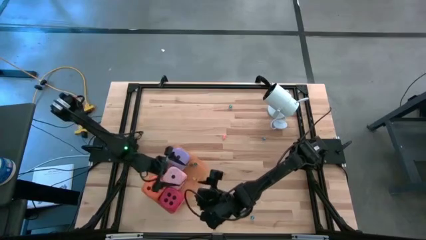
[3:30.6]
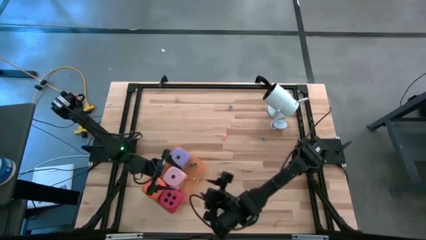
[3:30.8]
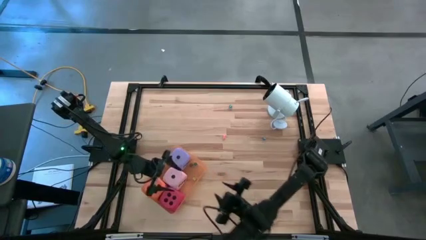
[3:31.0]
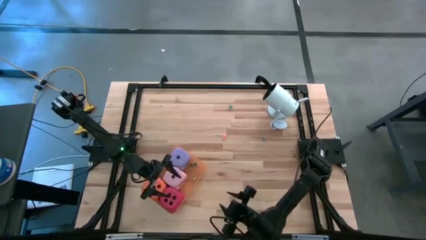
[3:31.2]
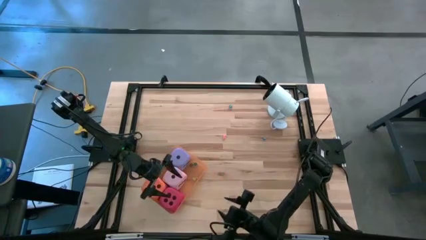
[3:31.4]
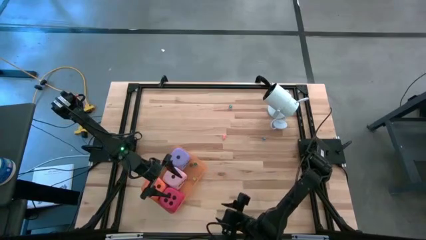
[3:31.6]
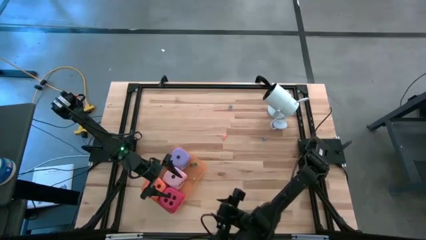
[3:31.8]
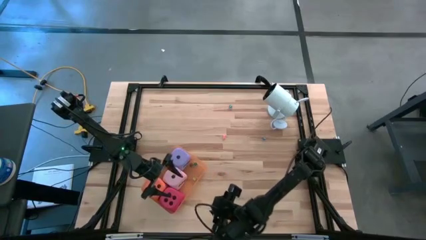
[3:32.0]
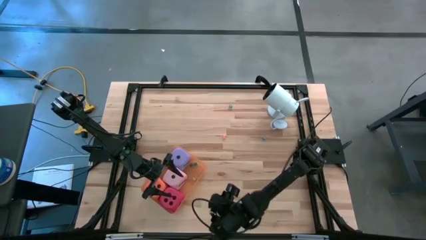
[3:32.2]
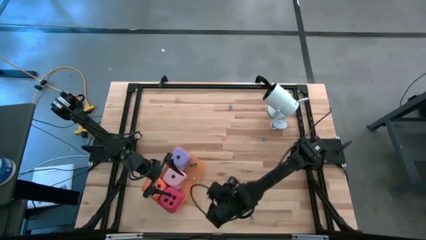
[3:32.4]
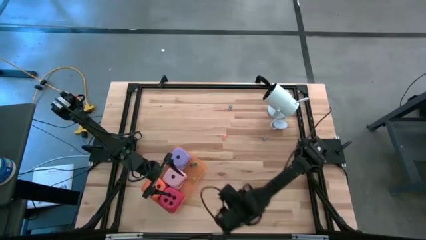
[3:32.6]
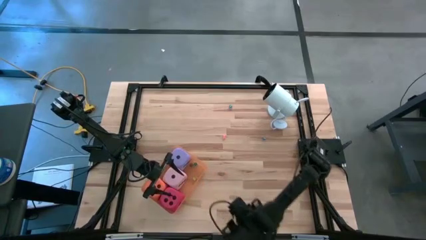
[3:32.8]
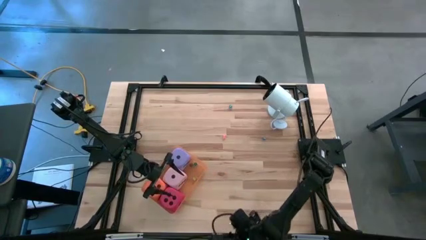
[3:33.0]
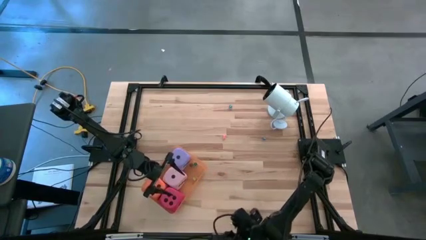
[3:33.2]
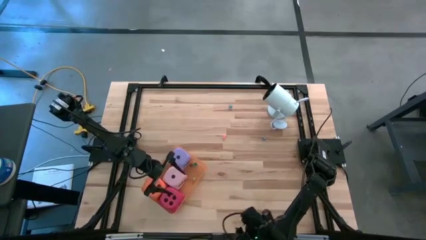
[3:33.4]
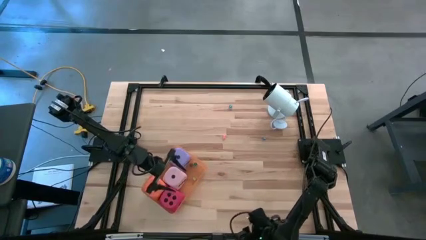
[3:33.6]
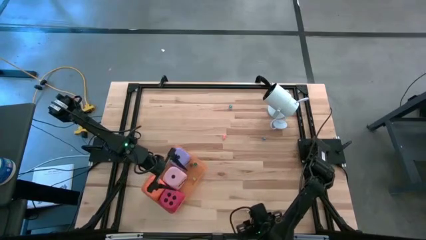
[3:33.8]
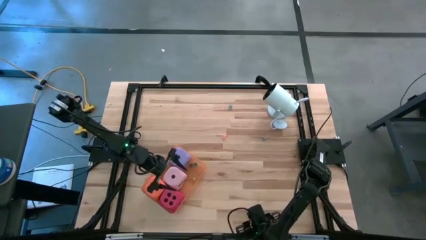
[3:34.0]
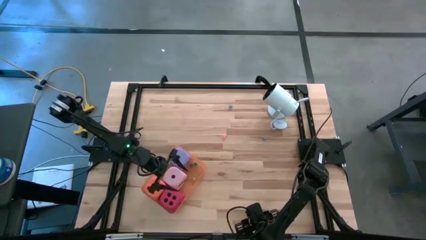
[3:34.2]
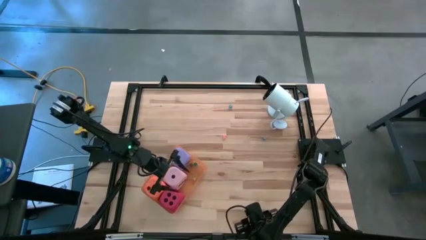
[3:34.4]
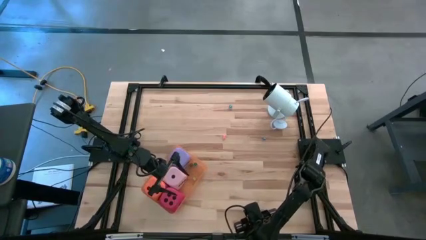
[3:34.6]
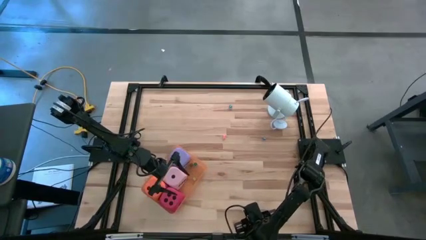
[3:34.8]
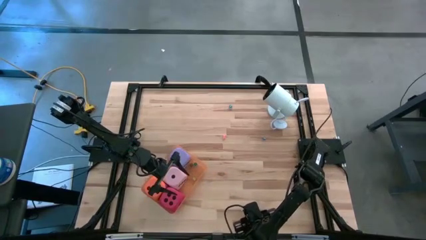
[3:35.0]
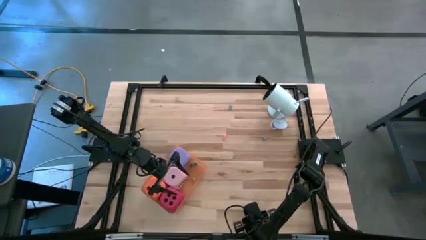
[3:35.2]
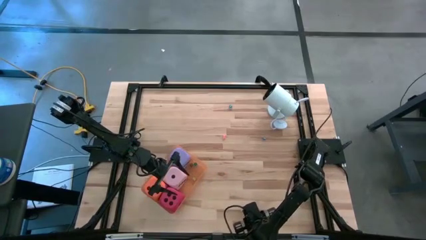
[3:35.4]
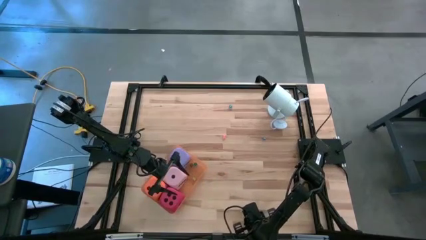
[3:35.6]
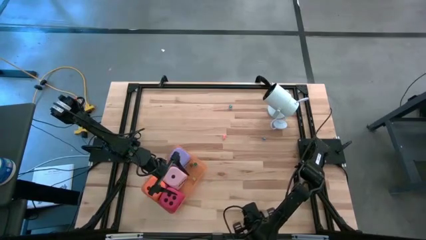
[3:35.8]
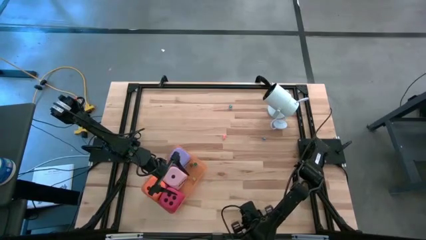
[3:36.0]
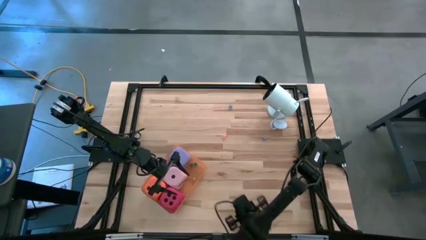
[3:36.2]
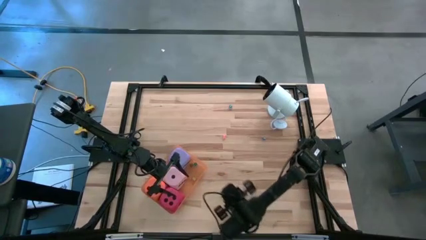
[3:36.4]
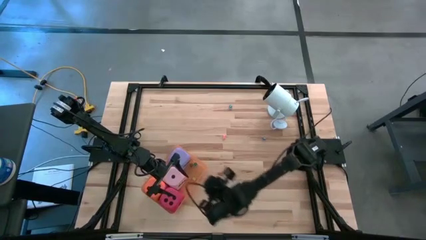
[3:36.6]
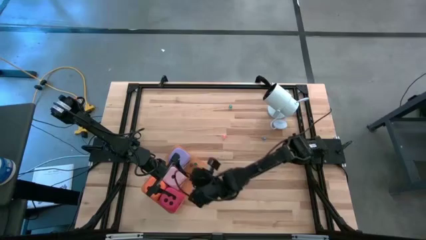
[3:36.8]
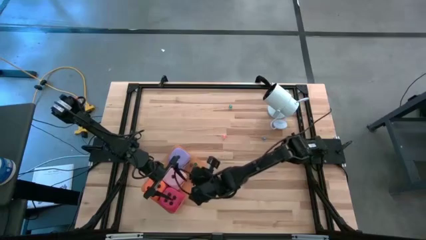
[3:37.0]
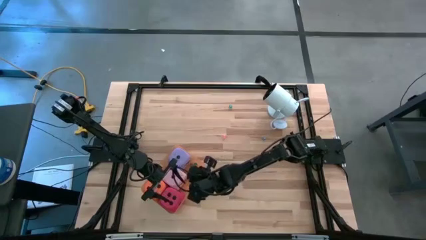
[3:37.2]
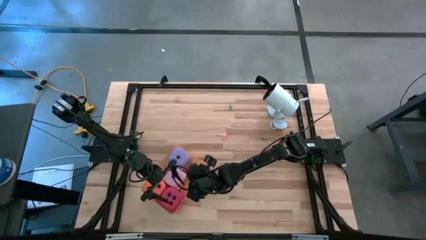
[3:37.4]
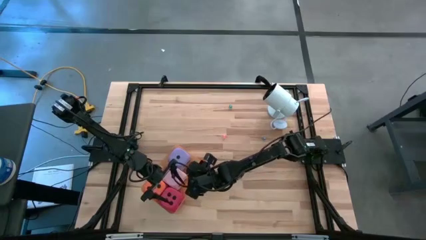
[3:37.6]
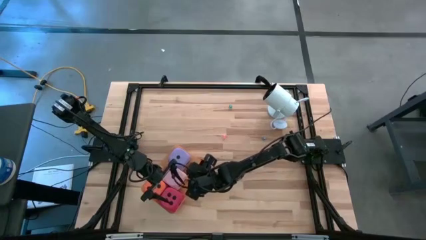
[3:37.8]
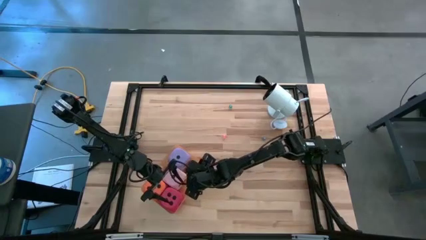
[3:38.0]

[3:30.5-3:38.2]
Task: Pick & Place Dice
Put the small blue dice into the orange bin

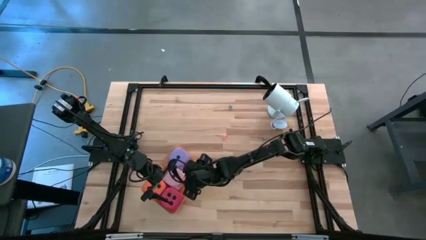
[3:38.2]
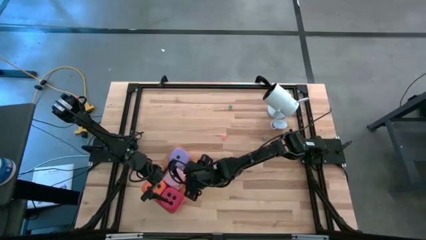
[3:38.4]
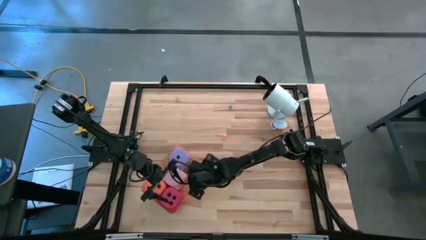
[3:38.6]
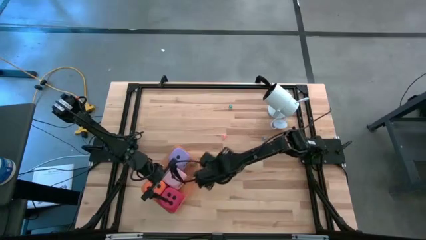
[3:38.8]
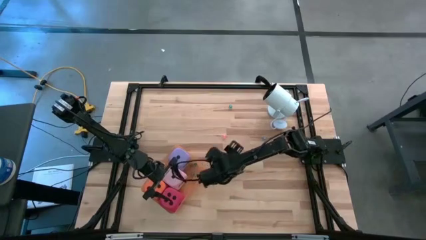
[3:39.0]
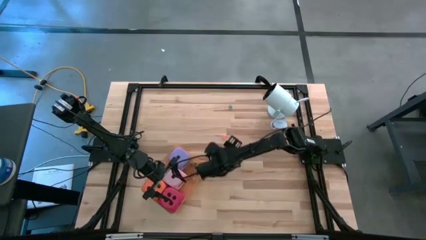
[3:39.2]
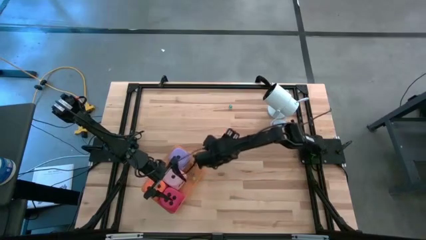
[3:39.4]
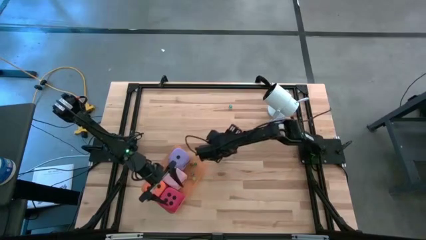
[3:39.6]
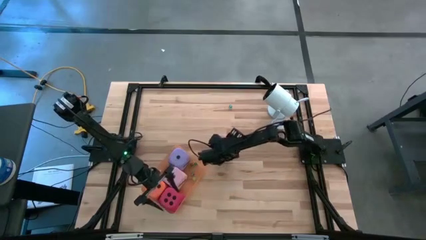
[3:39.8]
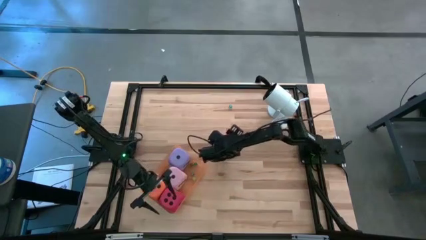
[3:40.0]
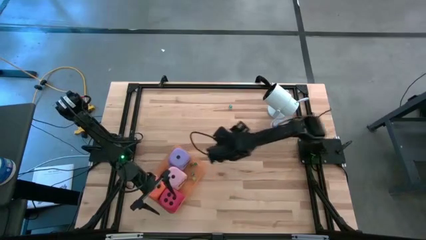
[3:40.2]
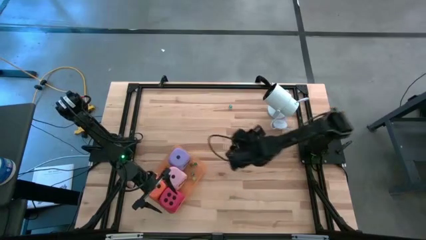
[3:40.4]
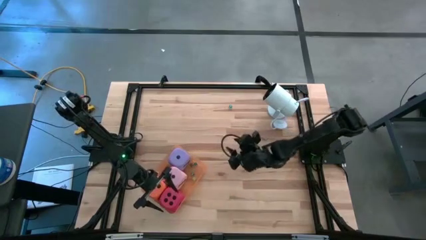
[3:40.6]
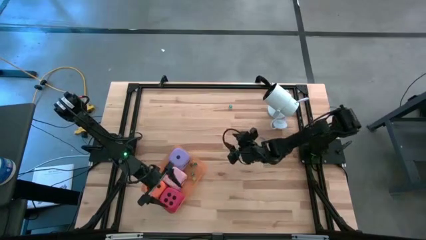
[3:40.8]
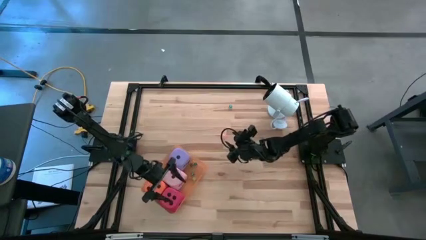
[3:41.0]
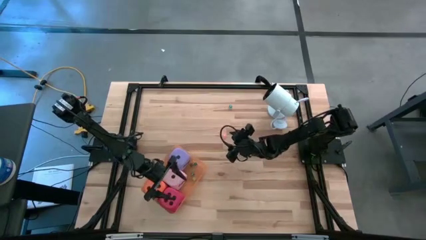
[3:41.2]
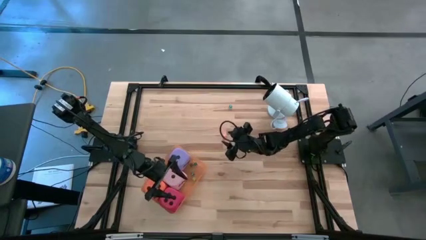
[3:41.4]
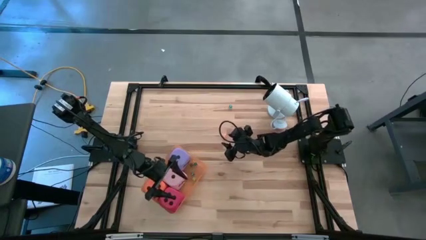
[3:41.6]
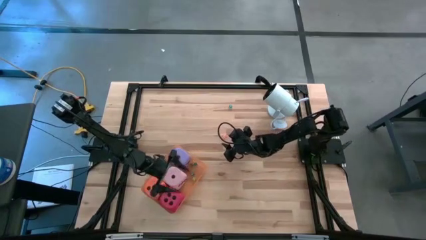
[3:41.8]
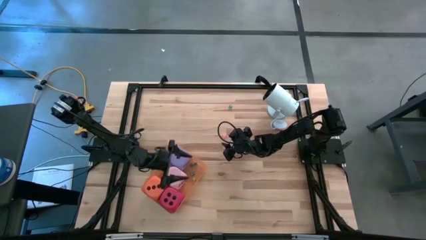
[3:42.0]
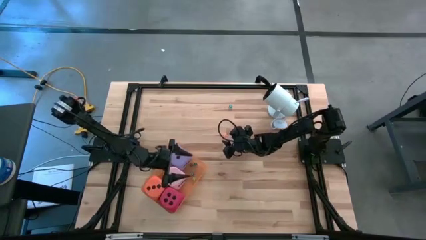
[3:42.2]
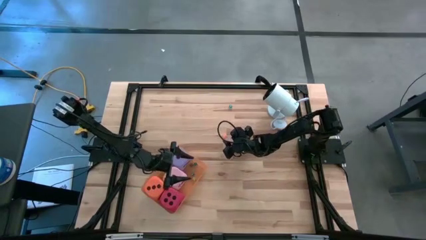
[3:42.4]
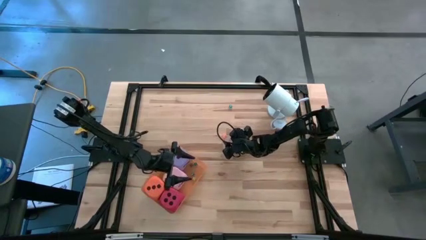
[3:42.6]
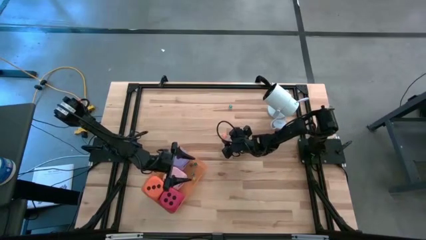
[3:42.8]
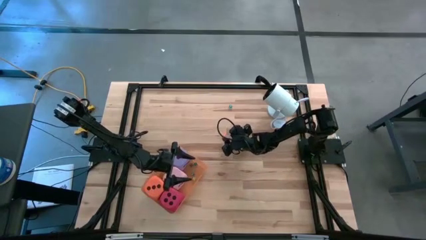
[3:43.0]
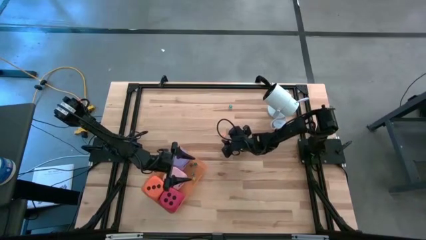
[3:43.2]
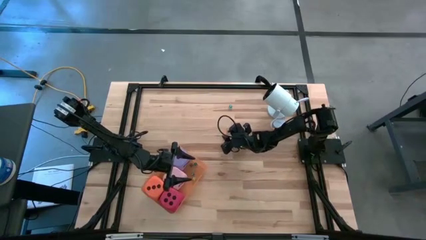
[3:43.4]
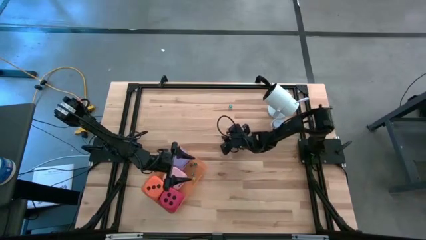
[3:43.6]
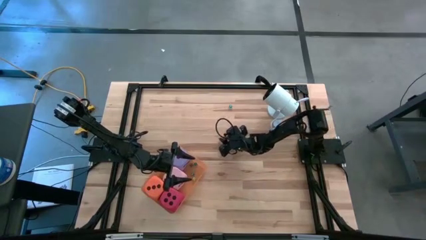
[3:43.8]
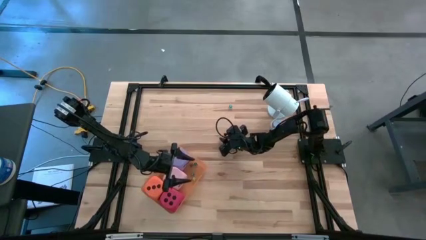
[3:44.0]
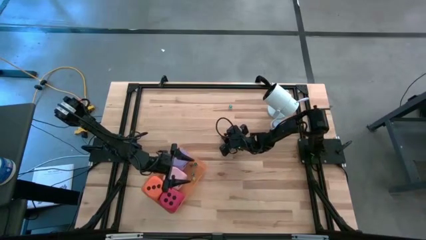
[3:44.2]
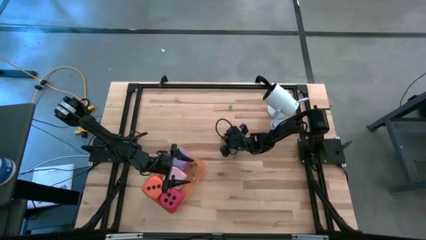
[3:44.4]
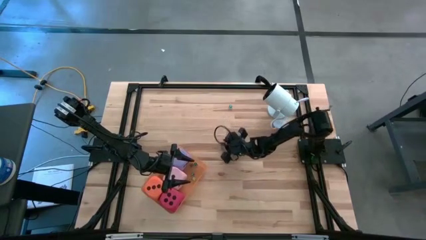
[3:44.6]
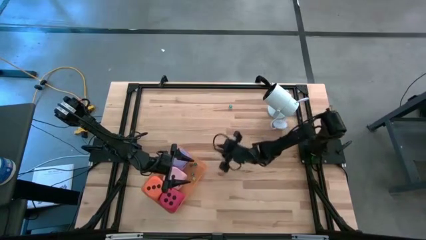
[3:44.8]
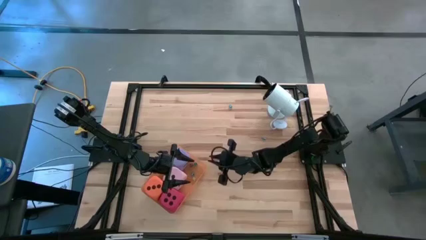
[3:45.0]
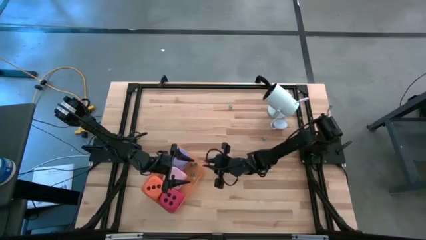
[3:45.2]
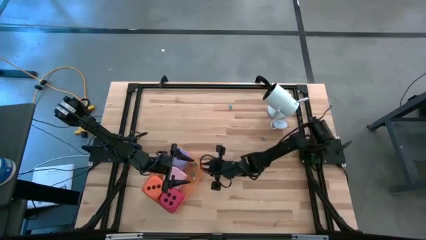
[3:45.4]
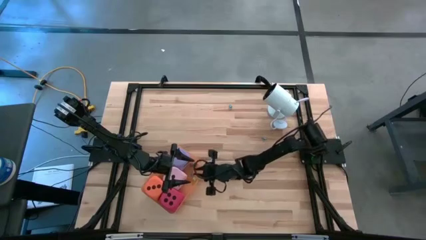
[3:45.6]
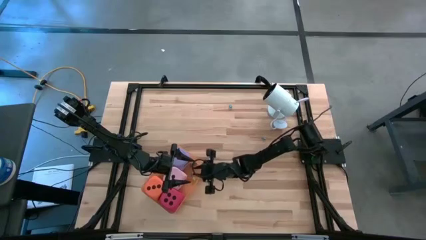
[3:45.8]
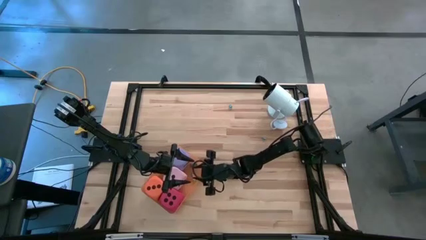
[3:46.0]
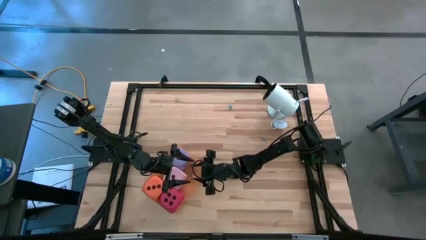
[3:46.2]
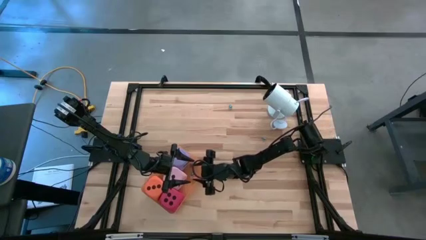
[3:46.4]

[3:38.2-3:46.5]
Put the orange and yellow dice into the orange bin

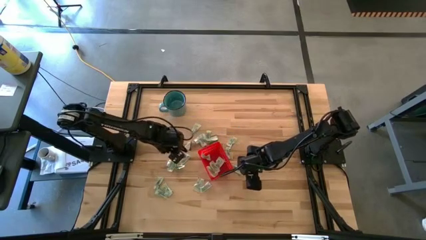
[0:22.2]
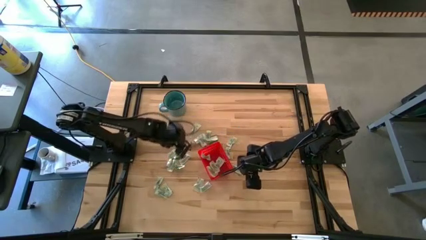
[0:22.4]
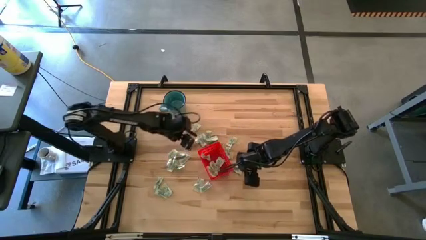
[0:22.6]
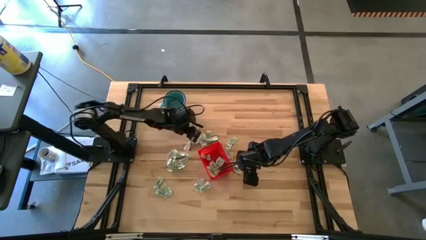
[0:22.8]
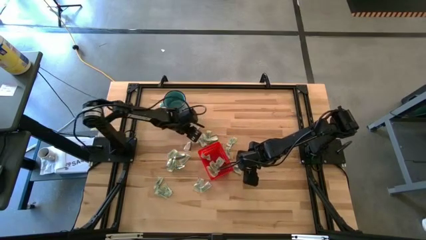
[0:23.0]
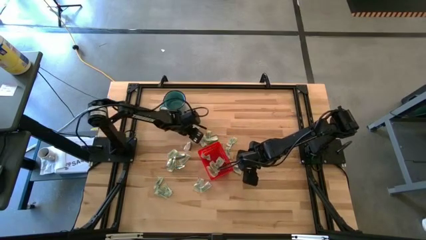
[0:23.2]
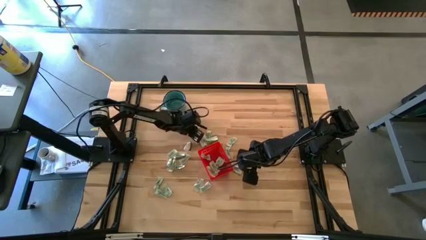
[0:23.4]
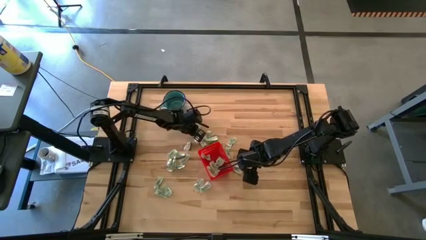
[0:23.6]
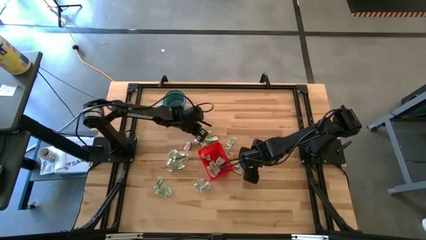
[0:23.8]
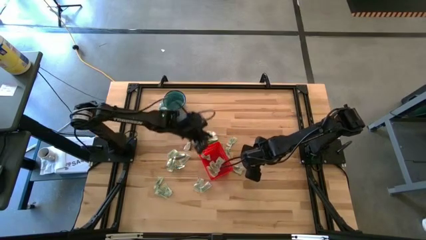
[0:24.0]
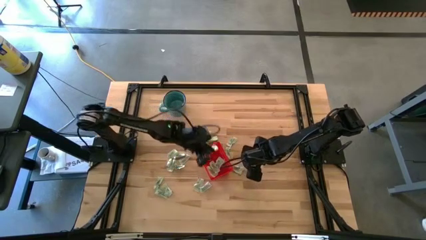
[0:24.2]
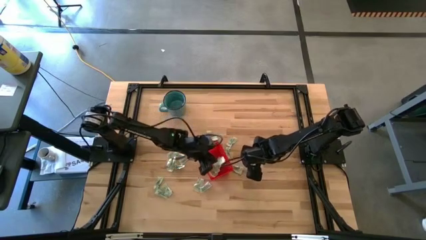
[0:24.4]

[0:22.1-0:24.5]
Task: Pick and place Stevia / Truvia into bins
Put the white stevia packet into the basket
